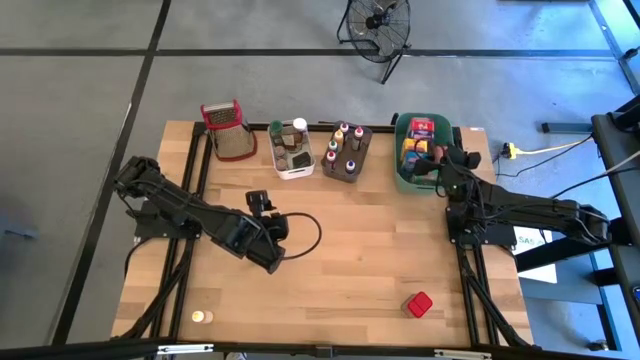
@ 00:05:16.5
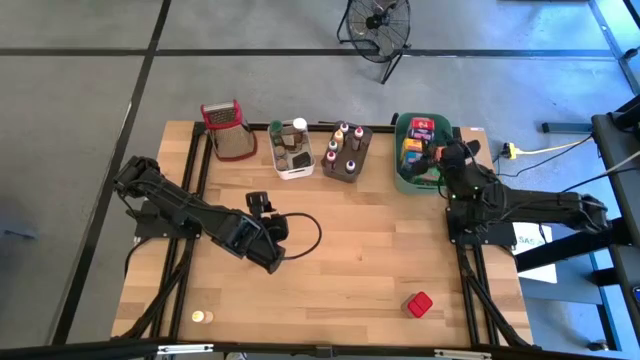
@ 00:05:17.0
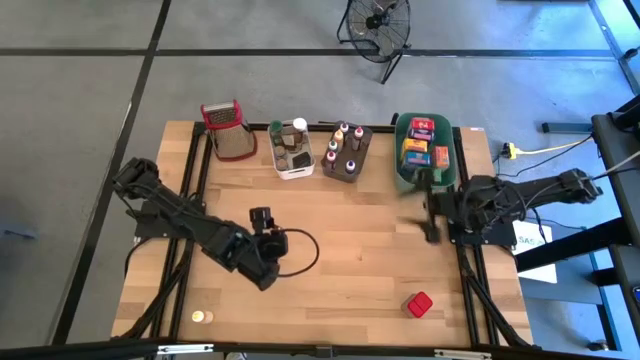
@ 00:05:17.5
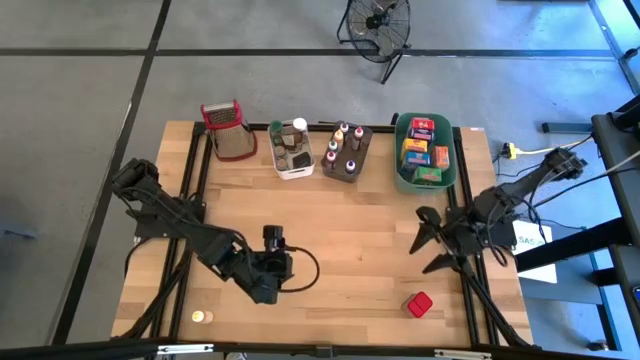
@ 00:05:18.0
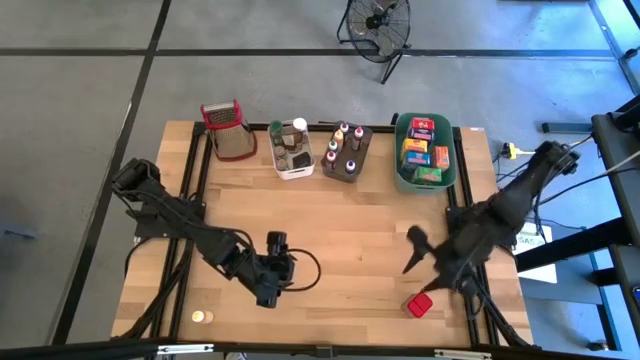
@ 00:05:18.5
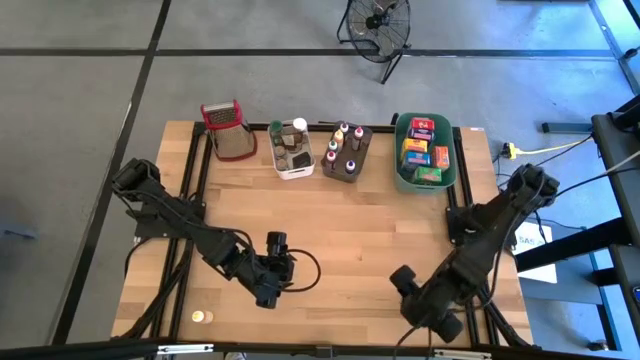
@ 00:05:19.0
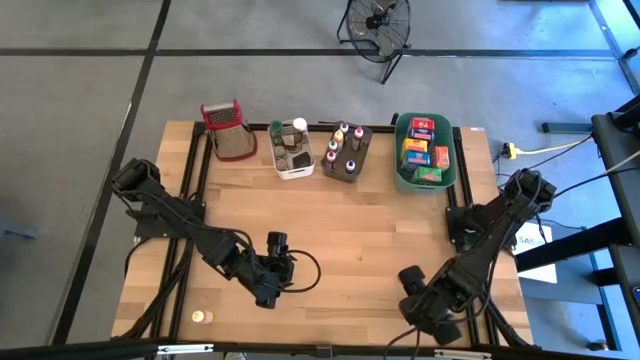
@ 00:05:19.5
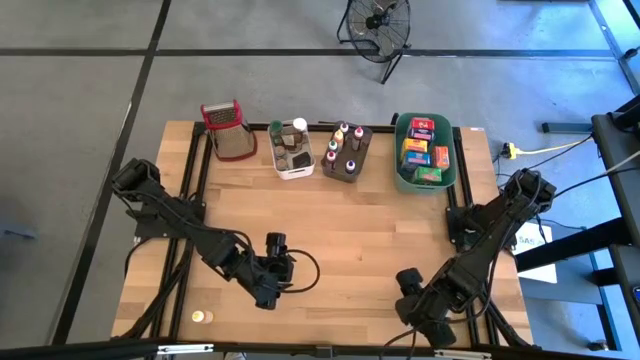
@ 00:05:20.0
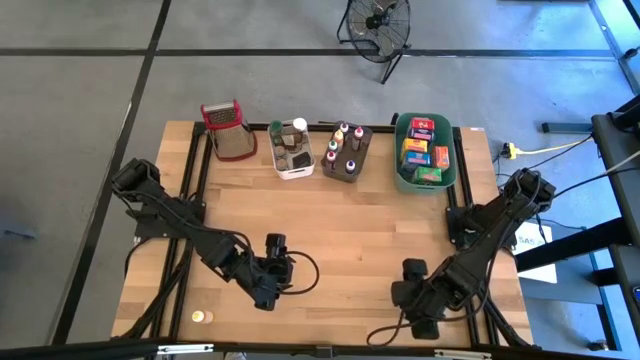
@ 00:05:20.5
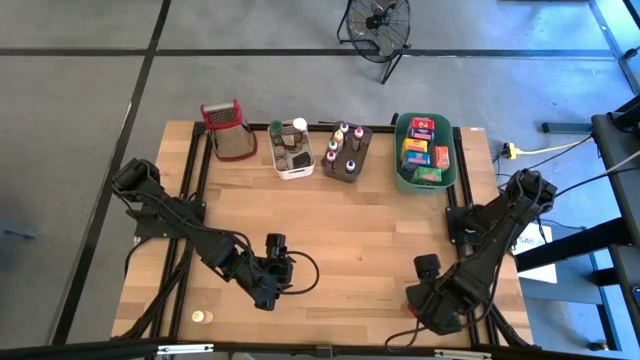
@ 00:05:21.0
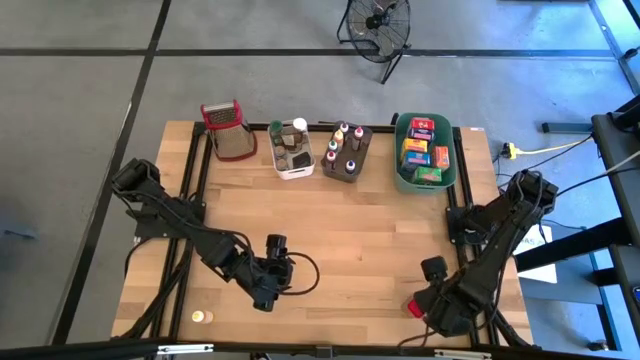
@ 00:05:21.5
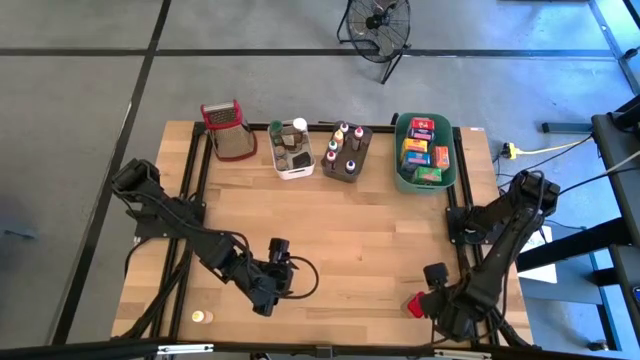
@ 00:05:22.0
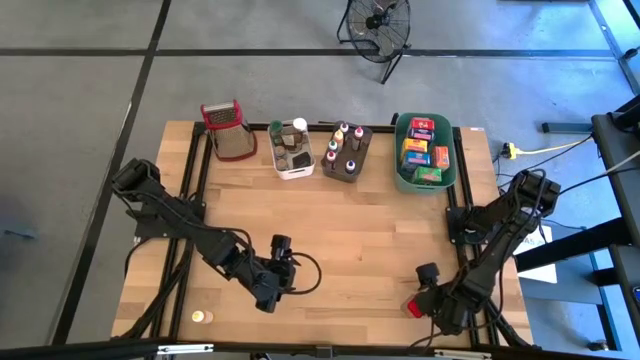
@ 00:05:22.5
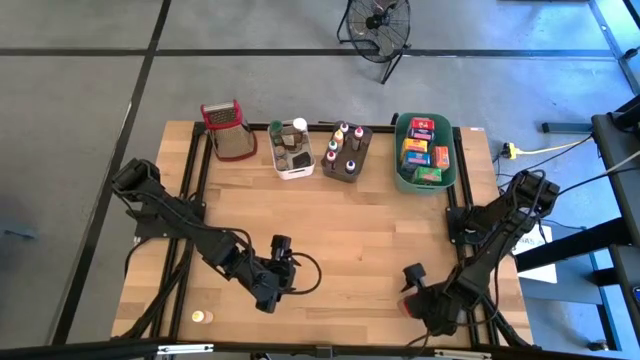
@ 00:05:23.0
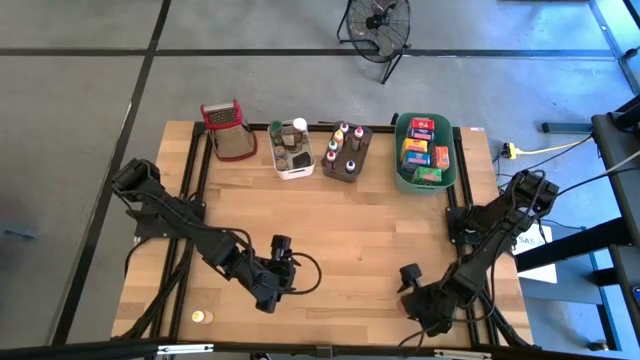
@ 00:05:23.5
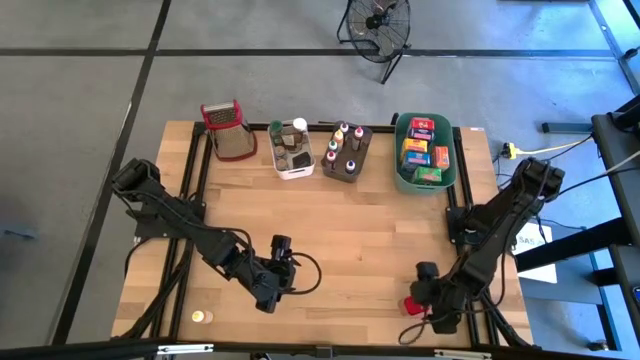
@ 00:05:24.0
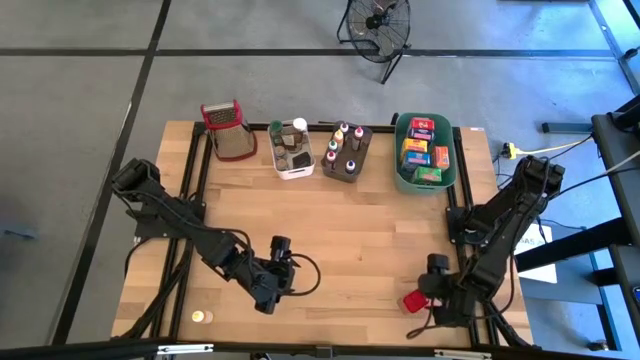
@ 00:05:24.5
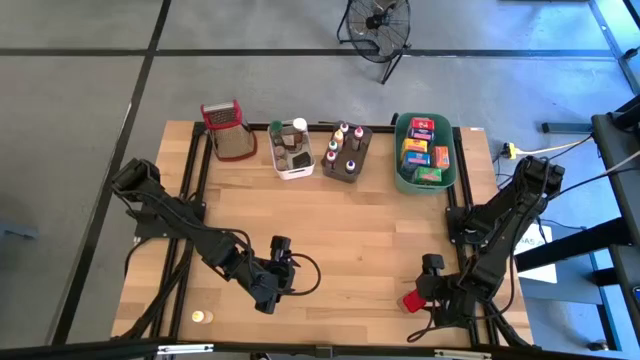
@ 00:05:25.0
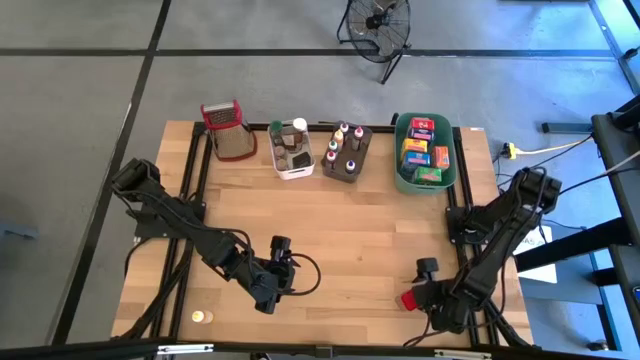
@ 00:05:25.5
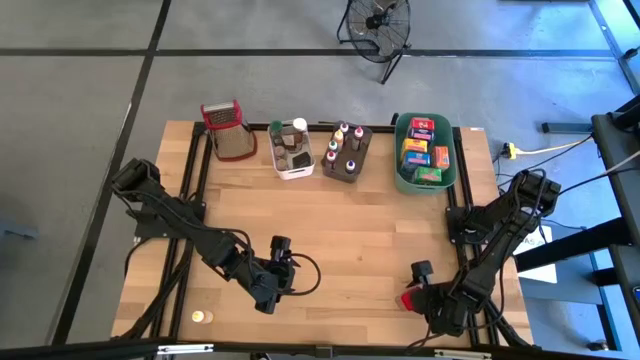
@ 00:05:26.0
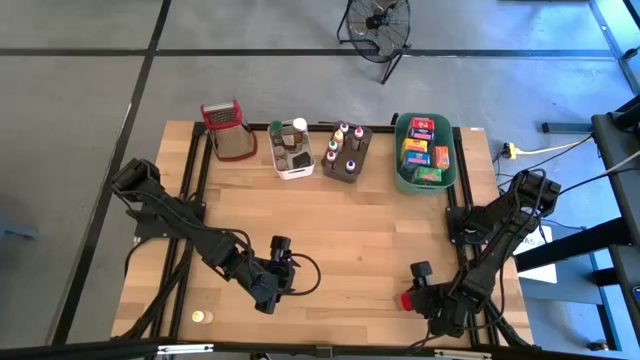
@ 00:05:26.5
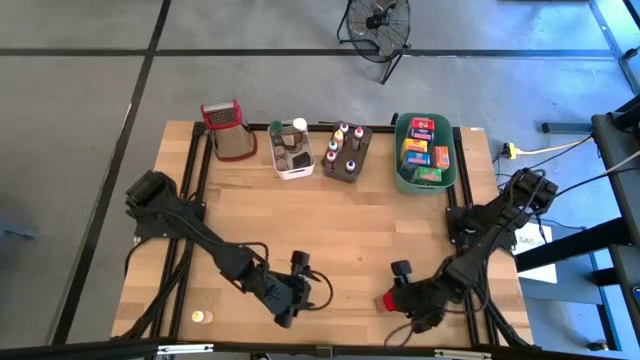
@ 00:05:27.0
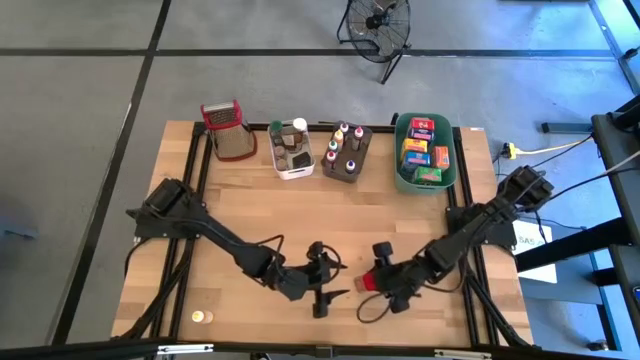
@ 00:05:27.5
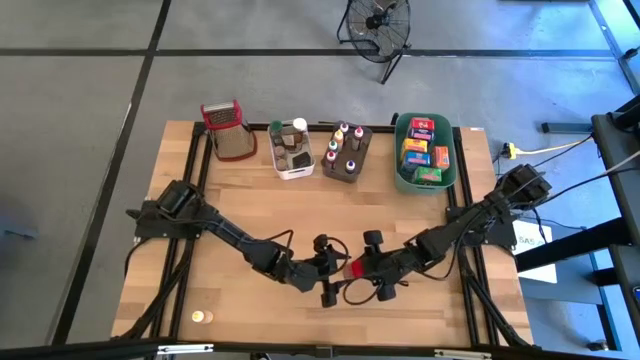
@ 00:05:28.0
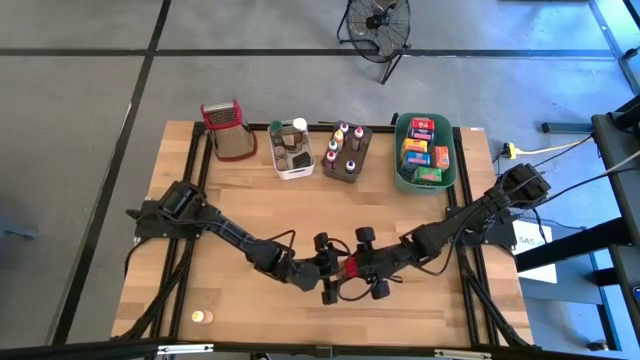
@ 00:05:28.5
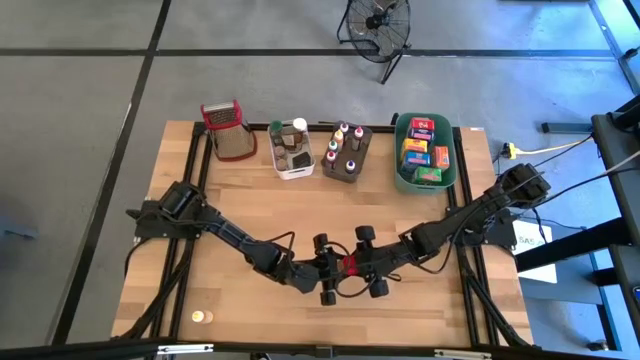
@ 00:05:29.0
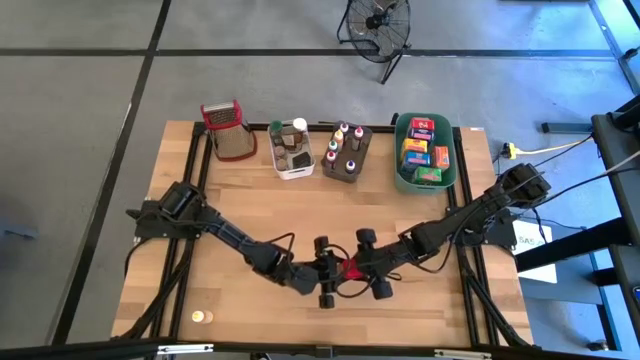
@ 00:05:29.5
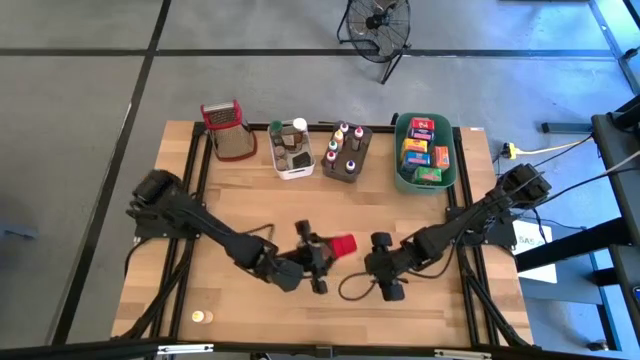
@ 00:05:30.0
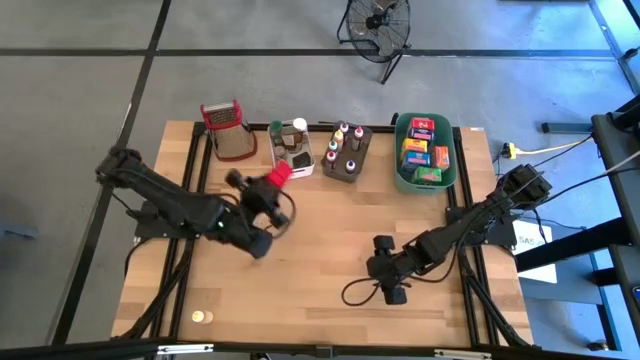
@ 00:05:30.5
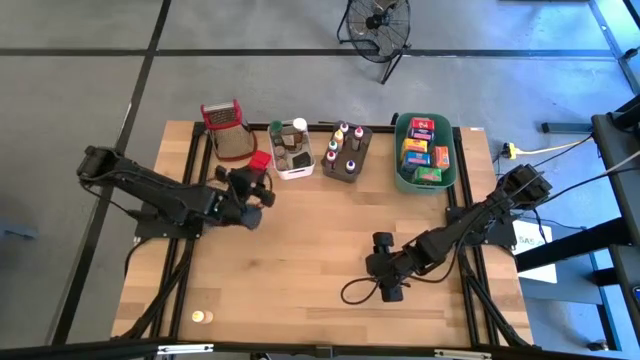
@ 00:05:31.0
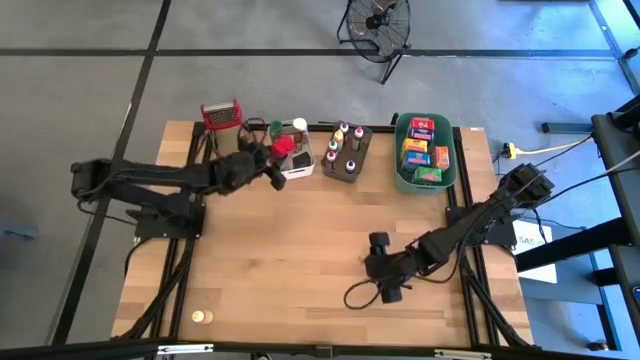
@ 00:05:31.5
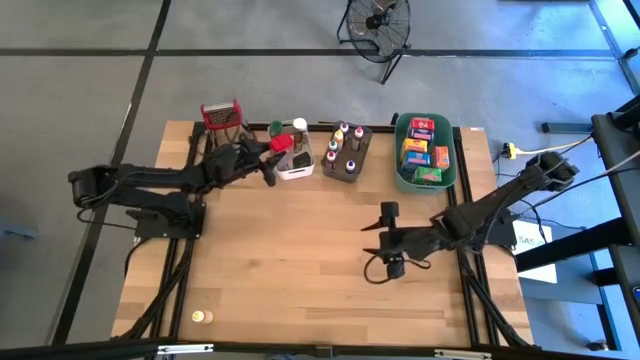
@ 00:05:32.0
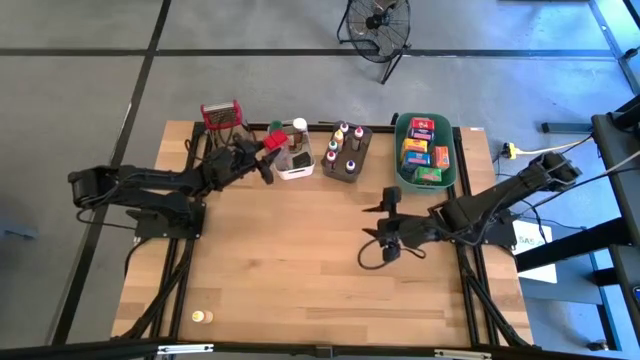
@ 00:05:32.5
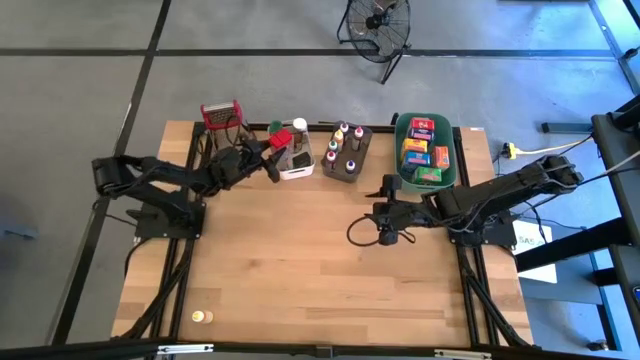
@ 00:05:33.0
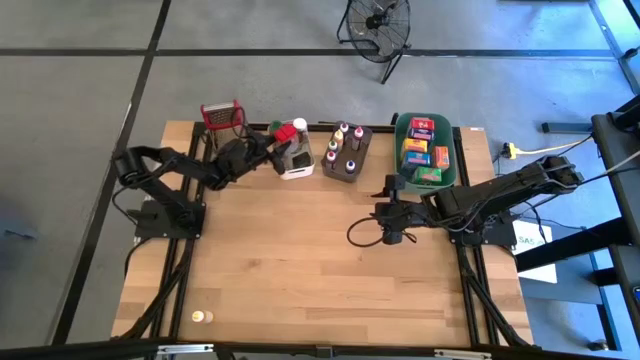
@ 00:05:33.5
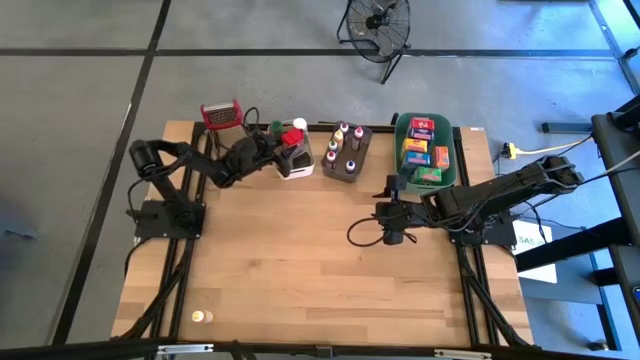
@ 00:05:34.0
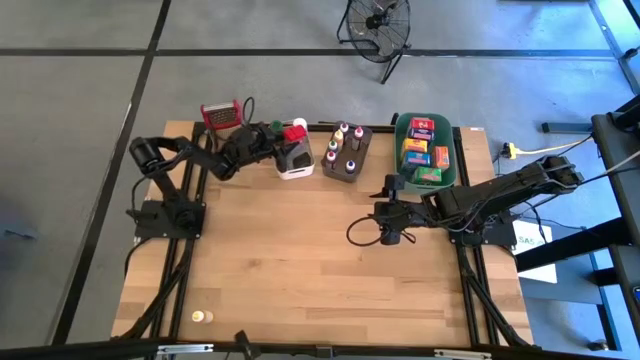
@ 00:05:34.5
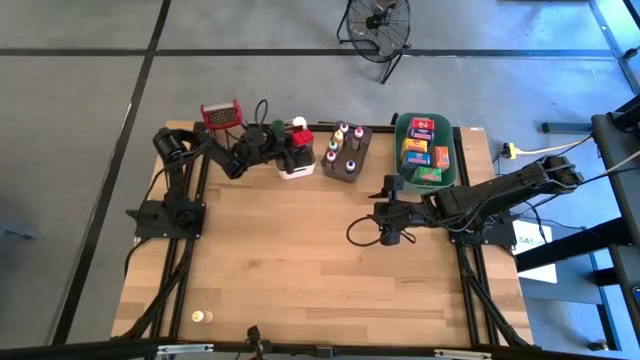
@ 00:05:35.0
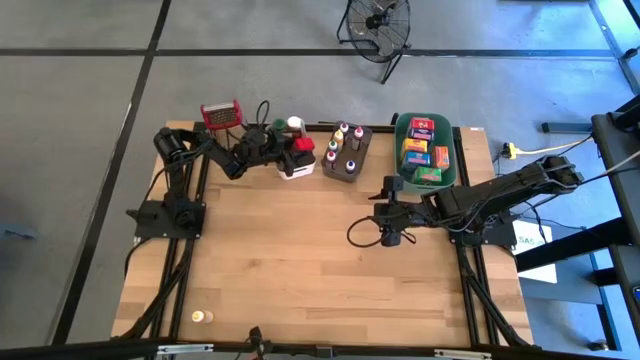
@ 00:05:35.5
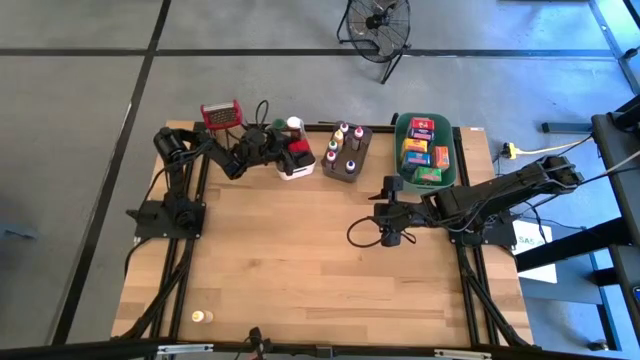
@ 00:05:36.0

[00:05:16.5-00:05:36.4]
Task: Pick & Place Kitchen Items
Put the red seasoning can into the white bin
